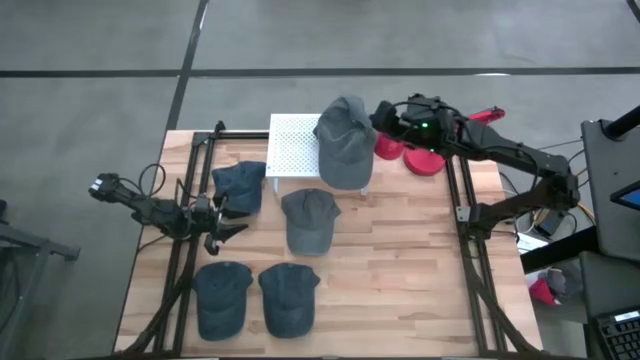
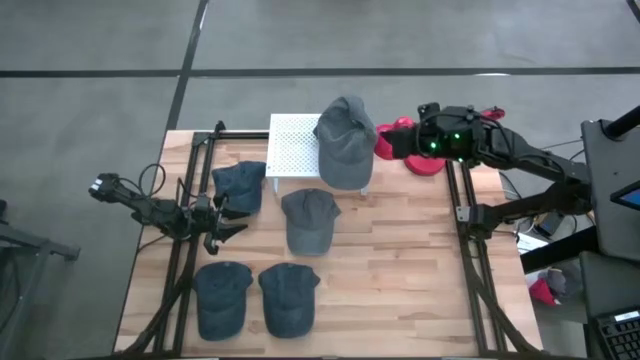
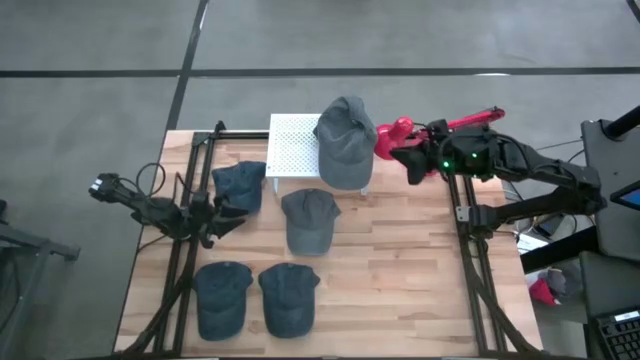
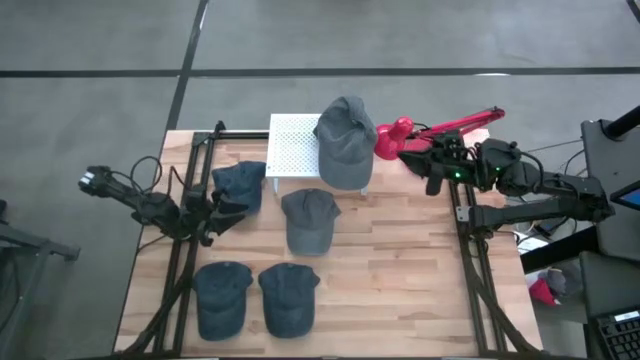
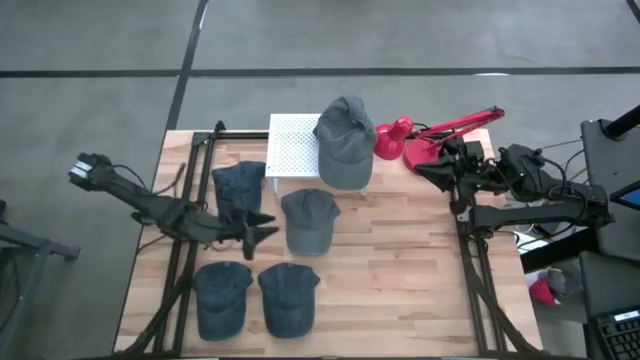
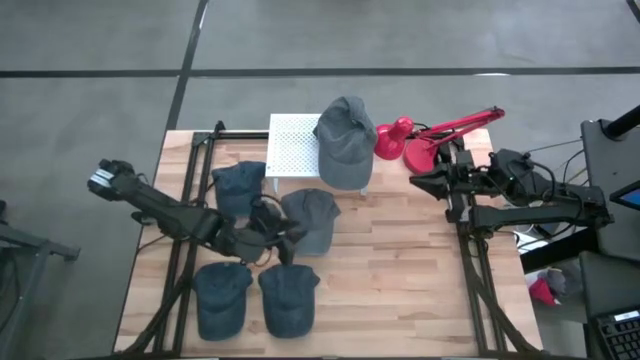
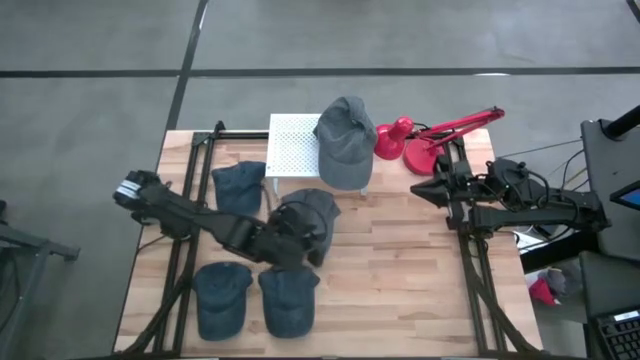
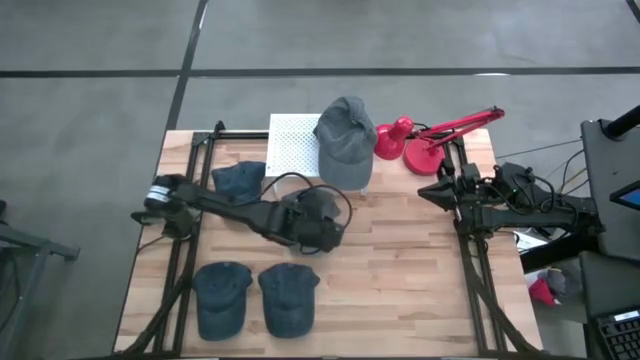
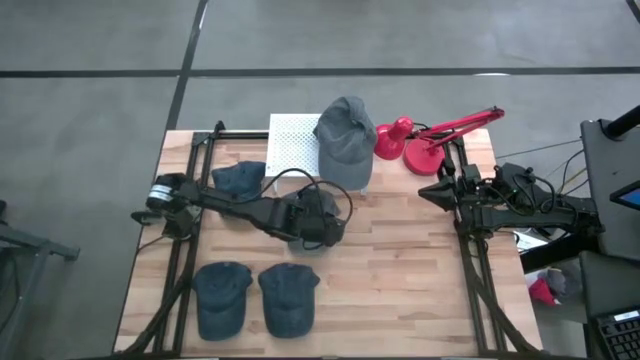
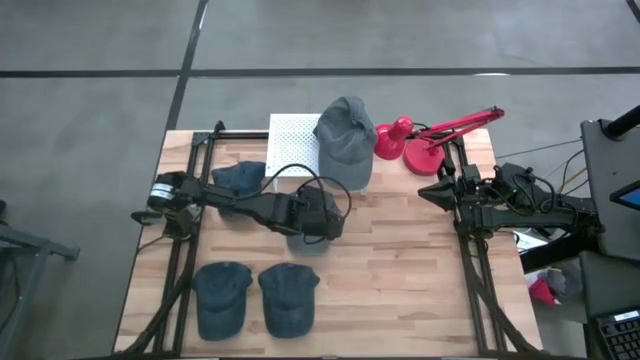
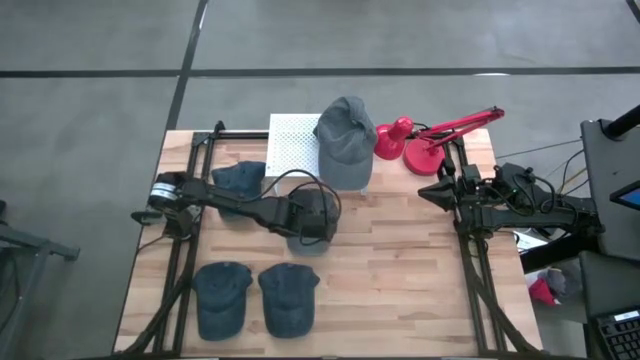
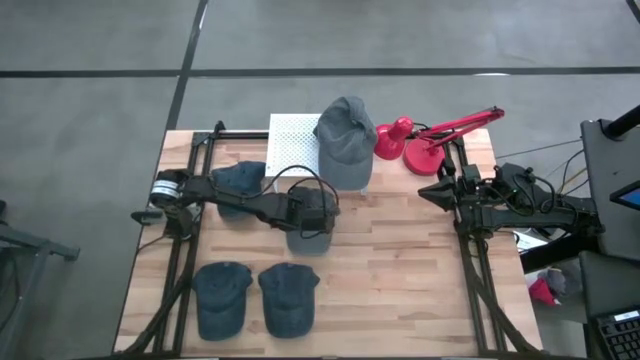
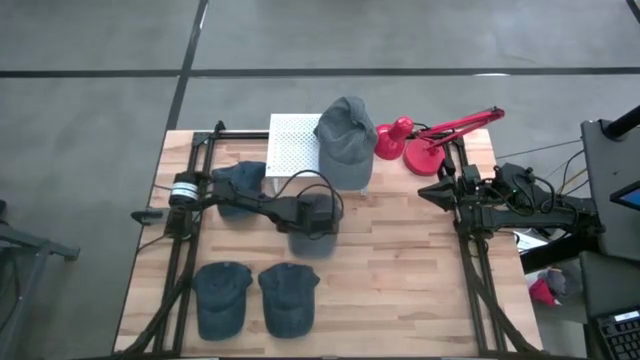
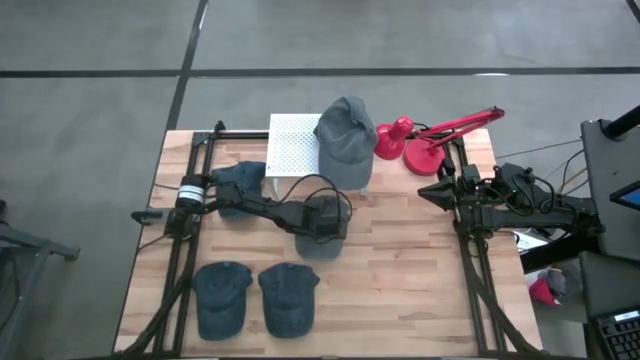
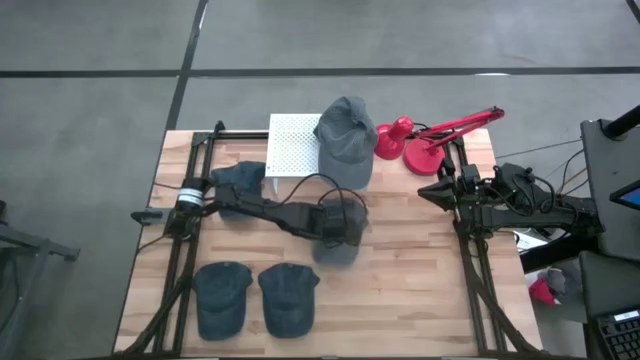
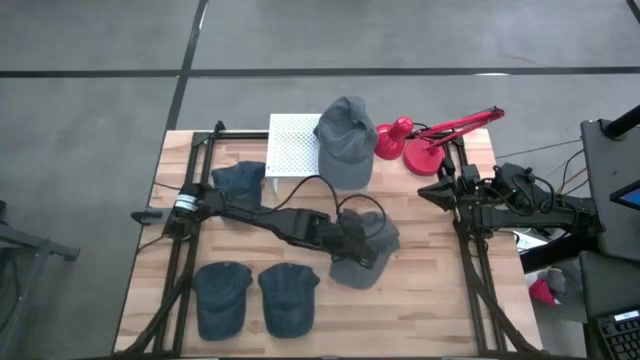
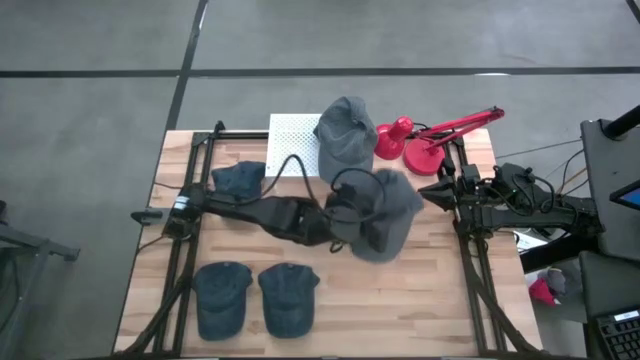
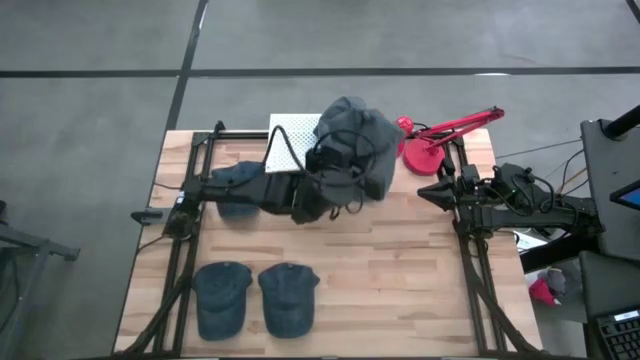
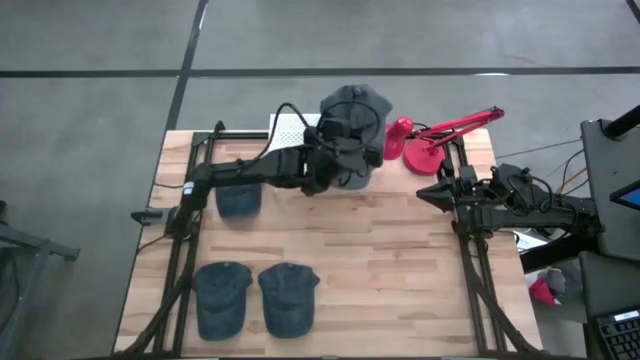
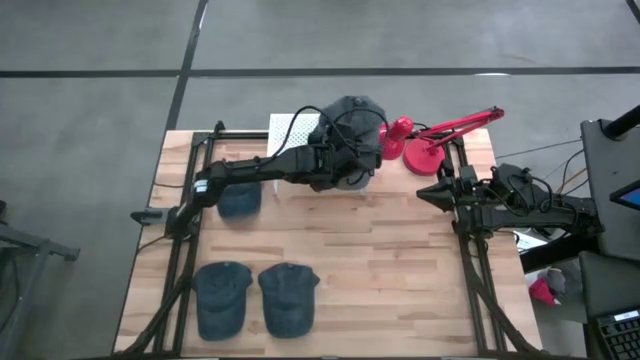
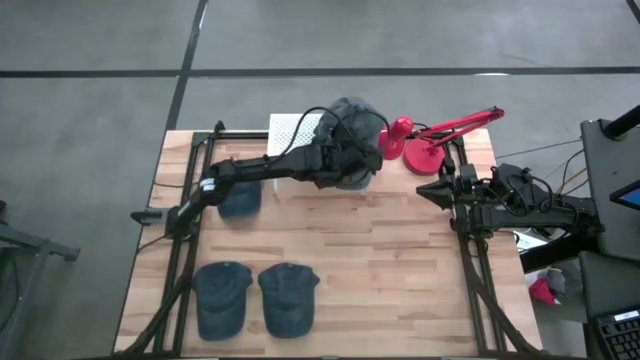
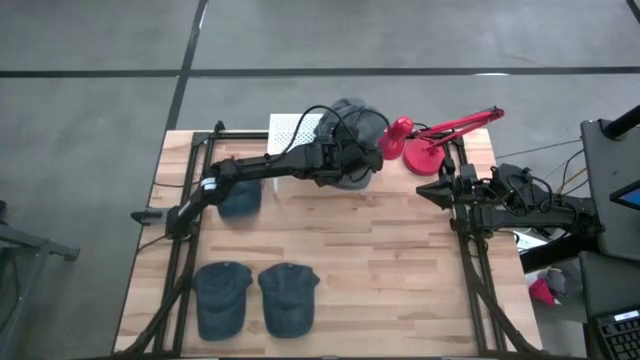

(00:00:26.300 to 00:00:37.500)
Task: Pick & Place hat
Stack the gray cap on top of the other gray cap on the shelf

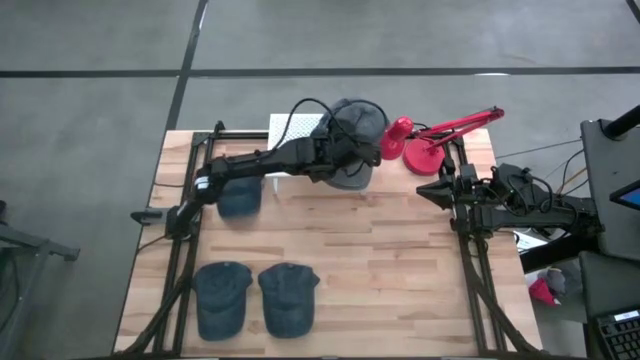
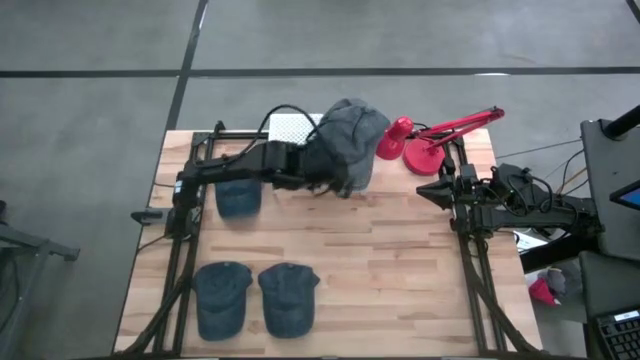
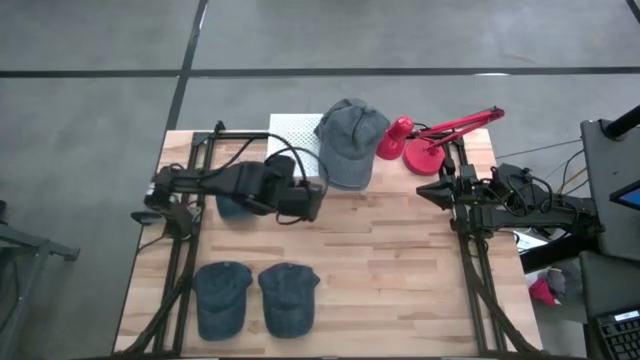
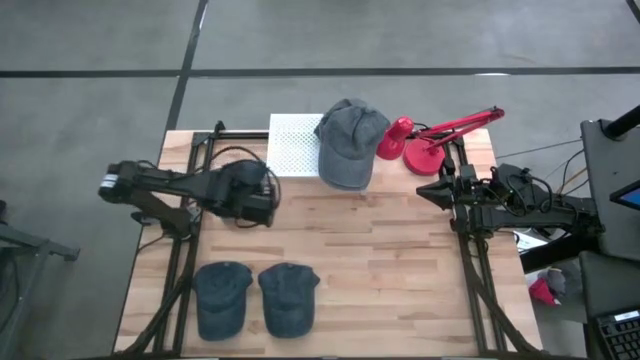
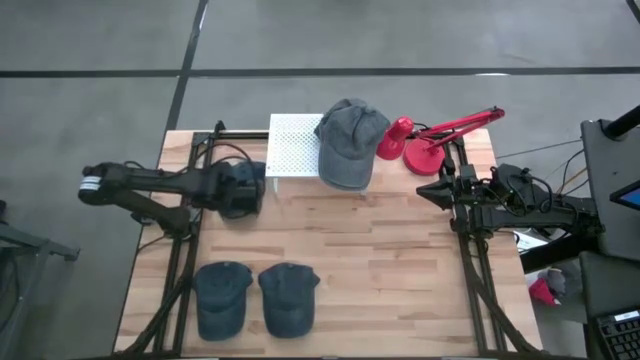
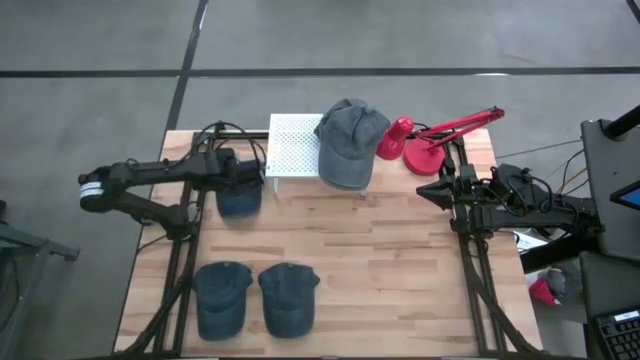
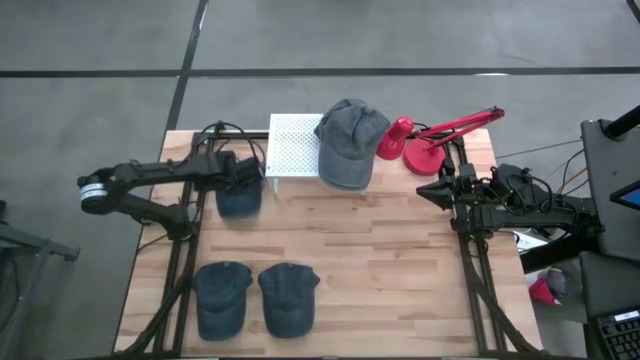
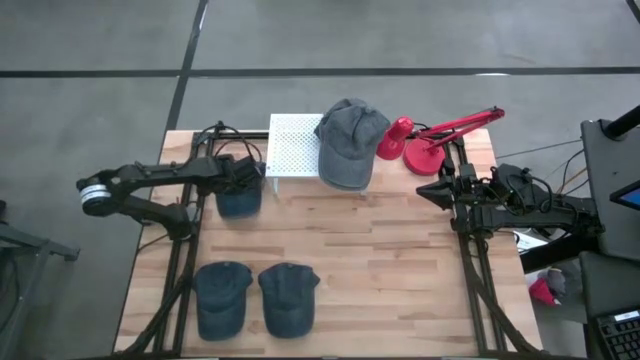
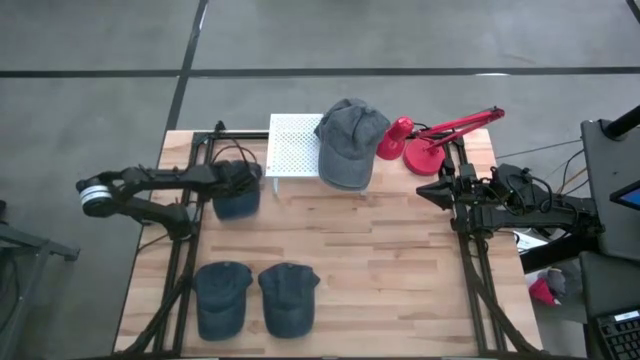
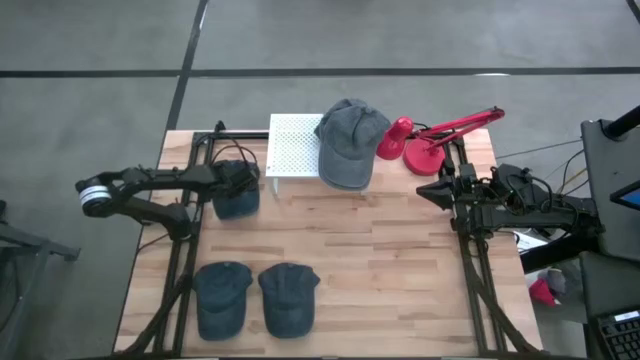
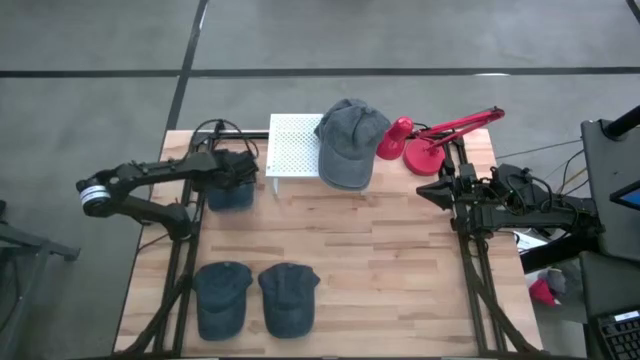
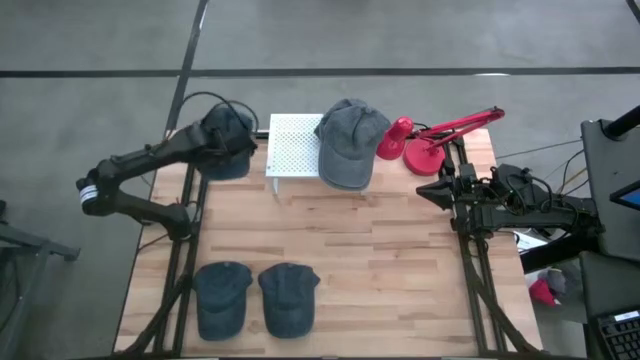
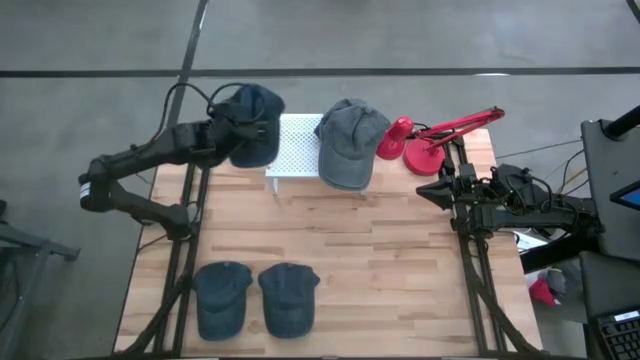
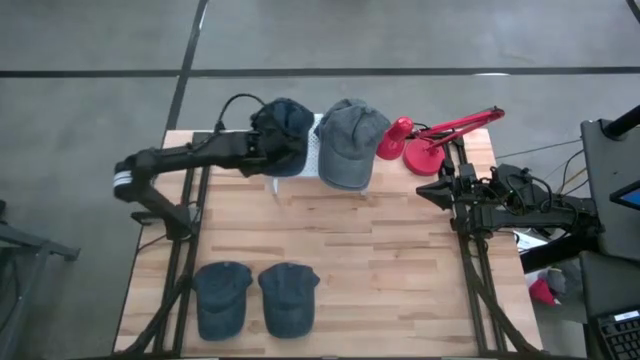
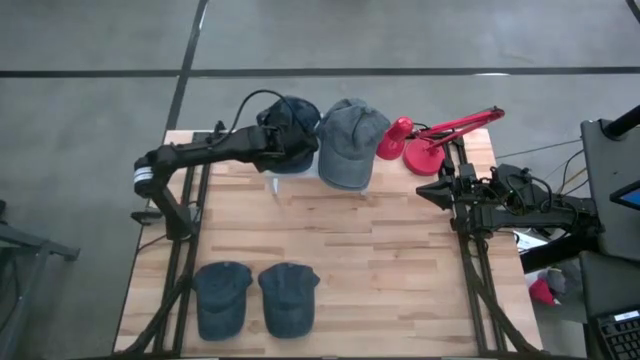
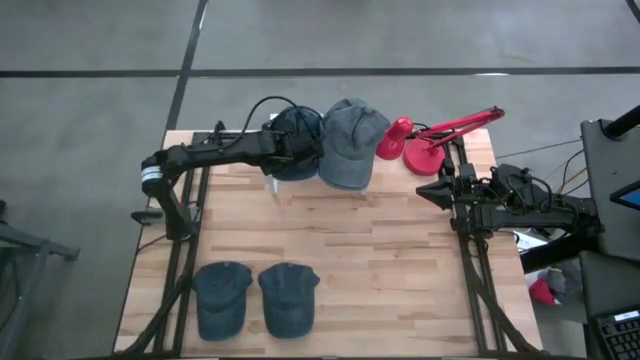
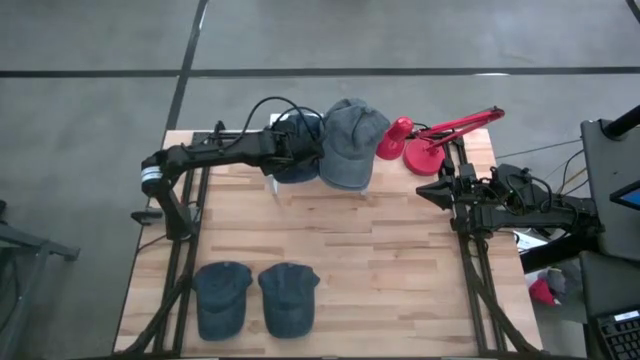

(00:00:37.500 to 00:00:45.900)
Put the top black cap on the shelf
